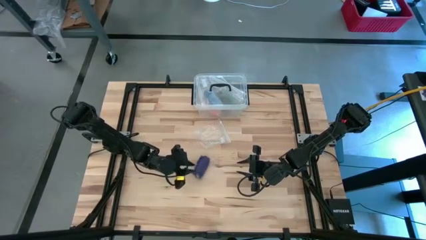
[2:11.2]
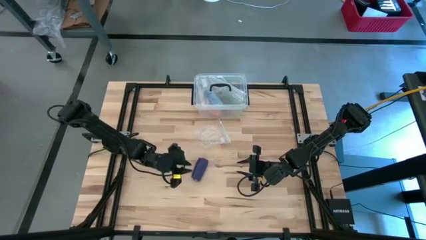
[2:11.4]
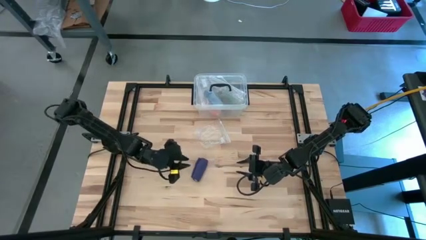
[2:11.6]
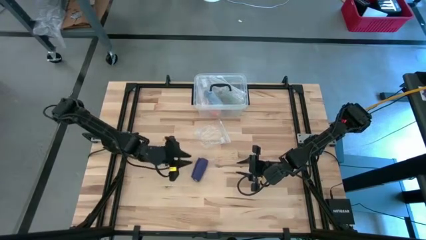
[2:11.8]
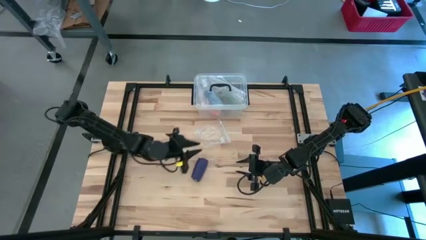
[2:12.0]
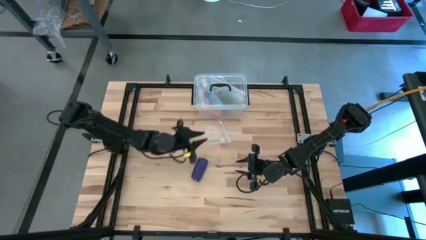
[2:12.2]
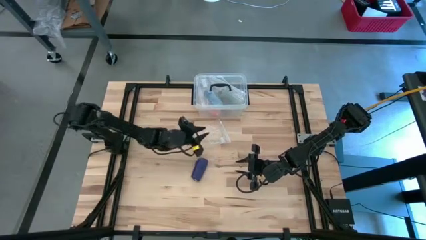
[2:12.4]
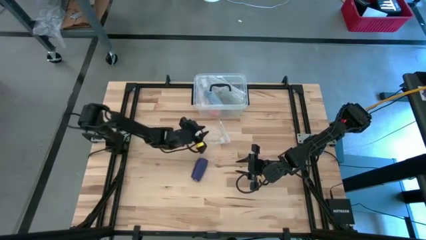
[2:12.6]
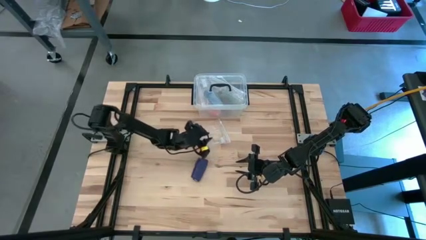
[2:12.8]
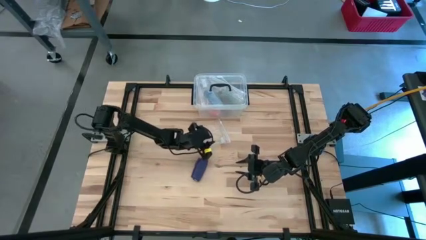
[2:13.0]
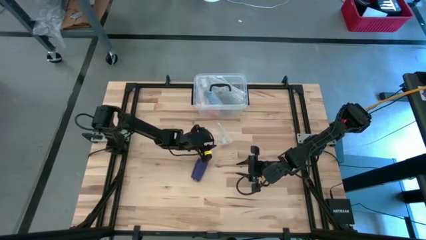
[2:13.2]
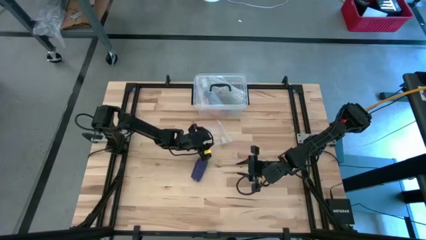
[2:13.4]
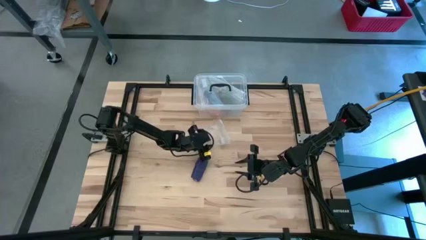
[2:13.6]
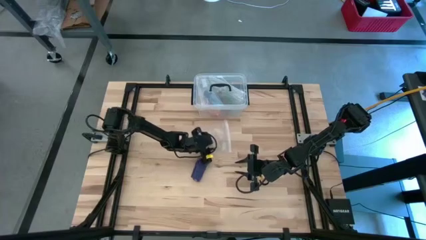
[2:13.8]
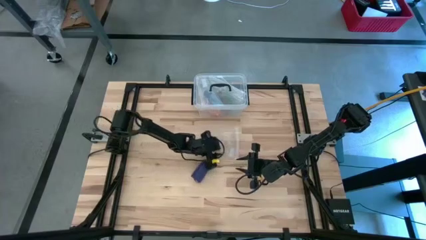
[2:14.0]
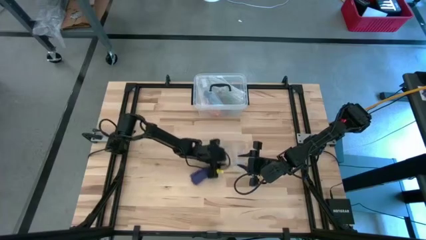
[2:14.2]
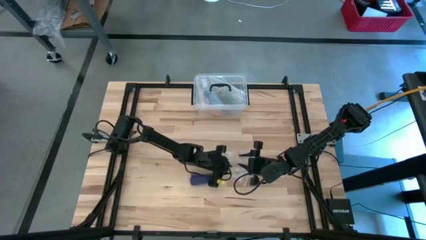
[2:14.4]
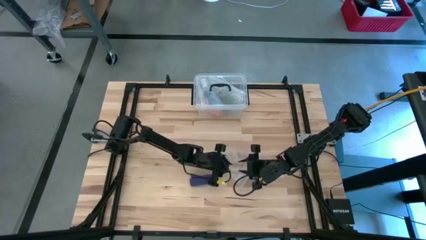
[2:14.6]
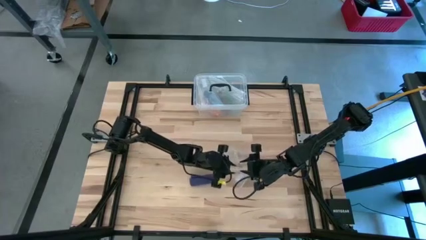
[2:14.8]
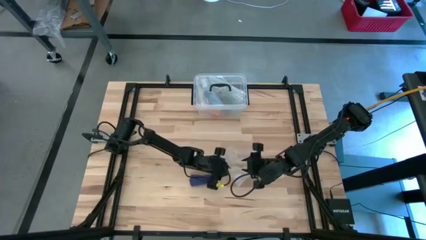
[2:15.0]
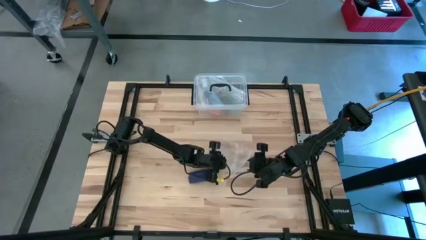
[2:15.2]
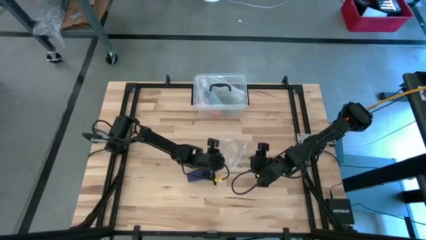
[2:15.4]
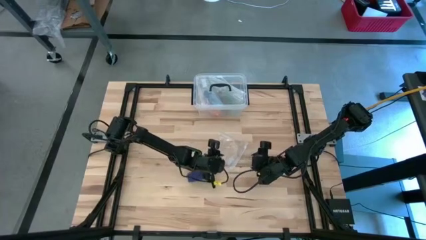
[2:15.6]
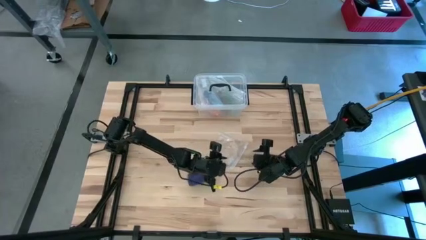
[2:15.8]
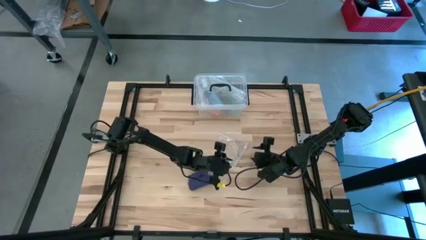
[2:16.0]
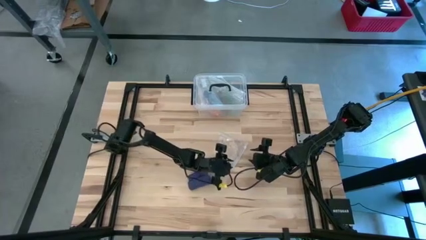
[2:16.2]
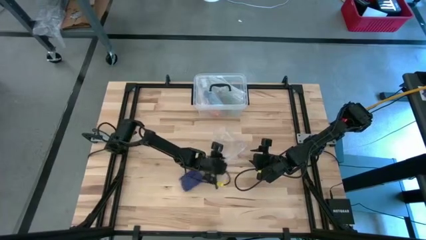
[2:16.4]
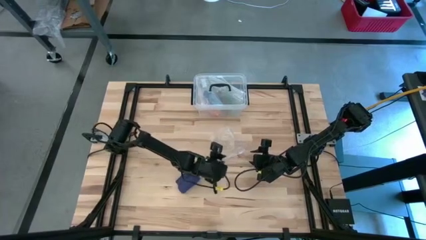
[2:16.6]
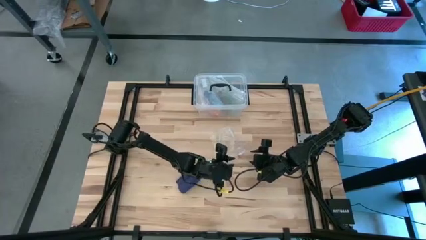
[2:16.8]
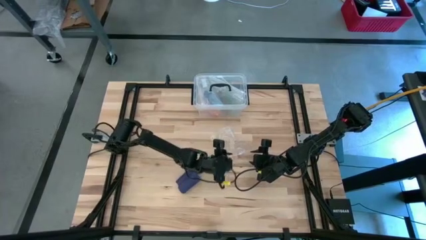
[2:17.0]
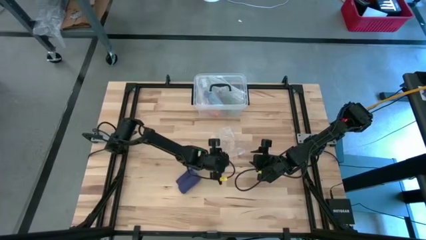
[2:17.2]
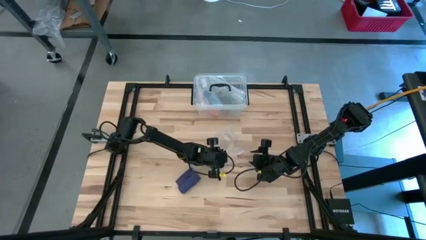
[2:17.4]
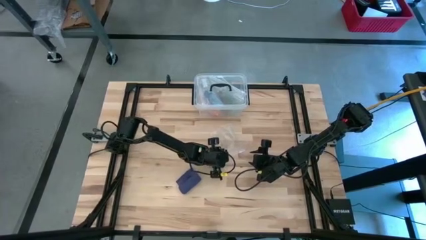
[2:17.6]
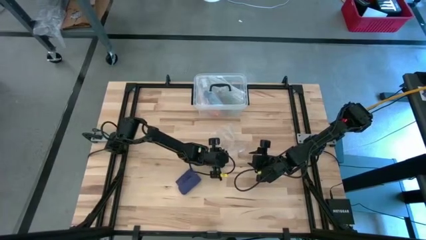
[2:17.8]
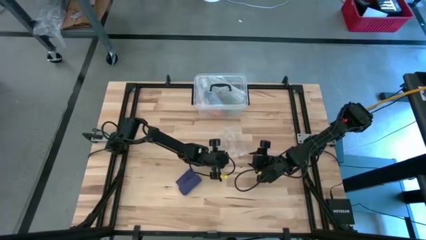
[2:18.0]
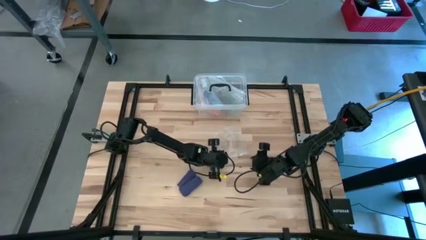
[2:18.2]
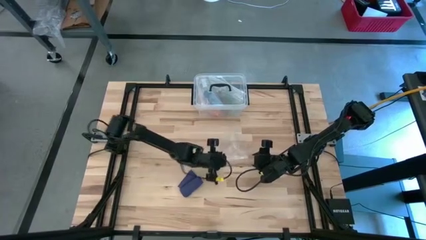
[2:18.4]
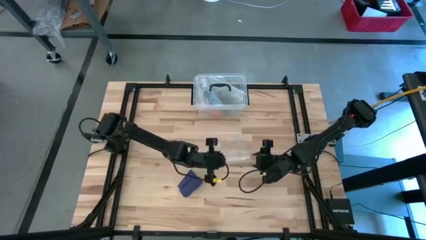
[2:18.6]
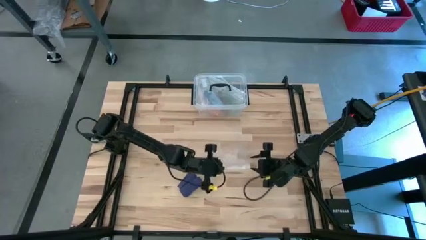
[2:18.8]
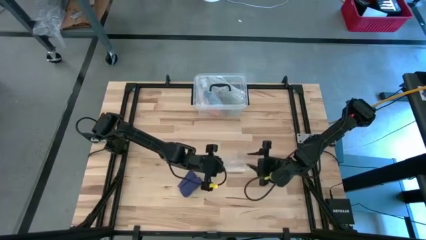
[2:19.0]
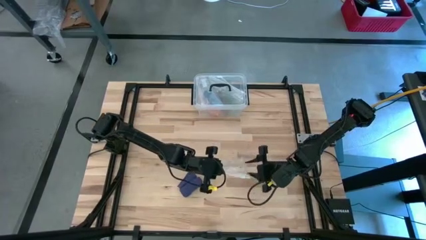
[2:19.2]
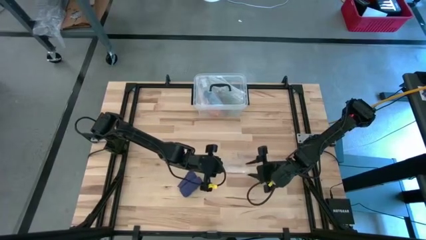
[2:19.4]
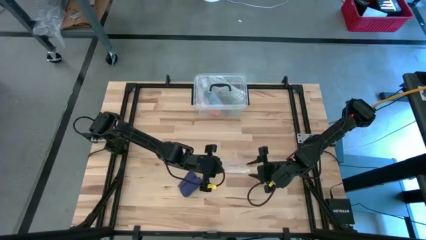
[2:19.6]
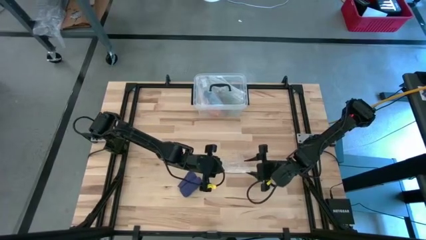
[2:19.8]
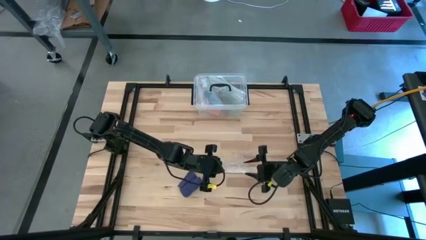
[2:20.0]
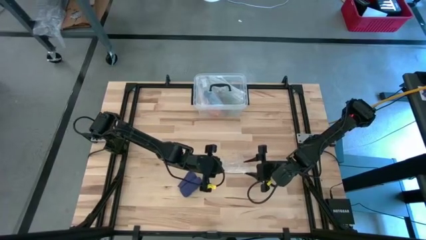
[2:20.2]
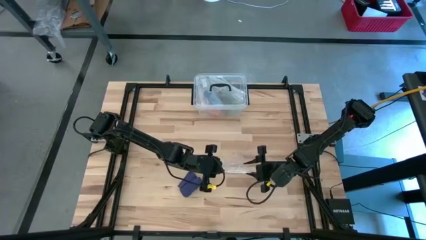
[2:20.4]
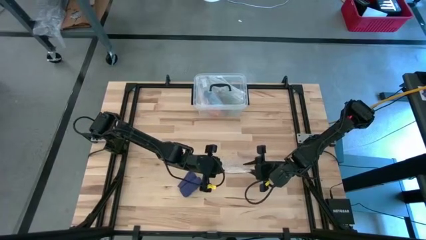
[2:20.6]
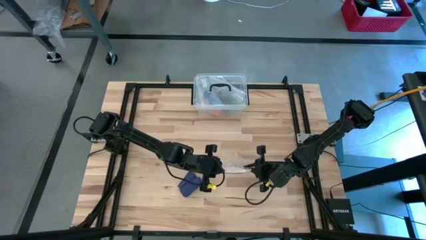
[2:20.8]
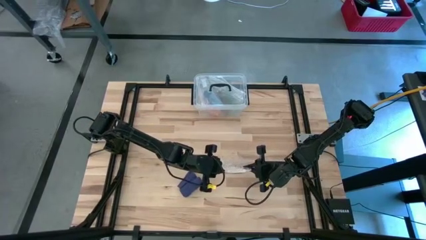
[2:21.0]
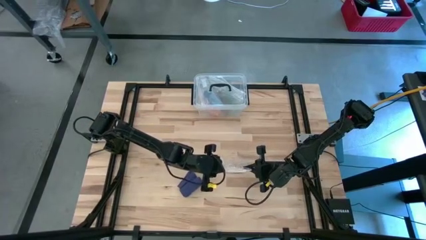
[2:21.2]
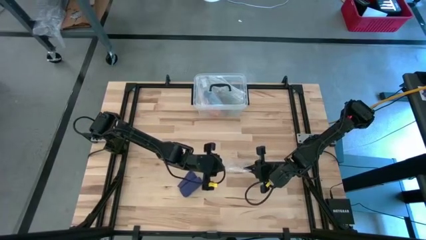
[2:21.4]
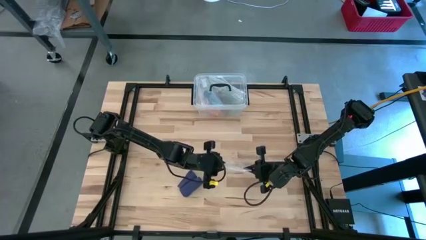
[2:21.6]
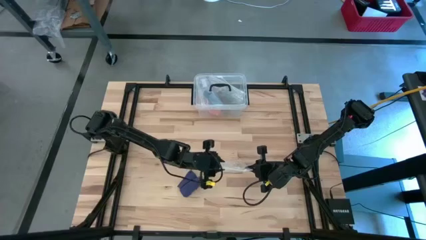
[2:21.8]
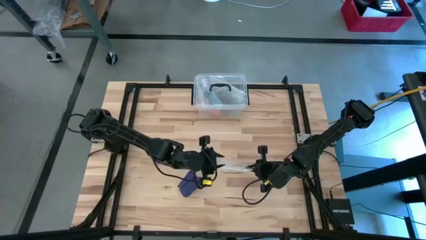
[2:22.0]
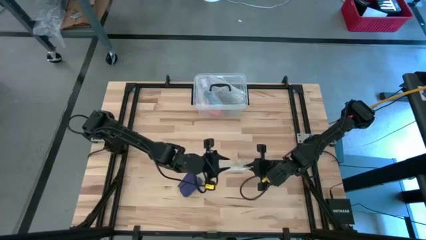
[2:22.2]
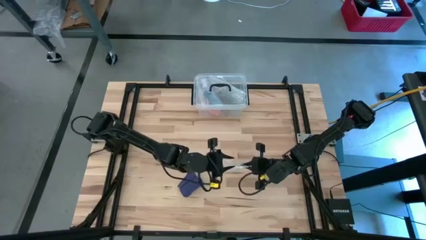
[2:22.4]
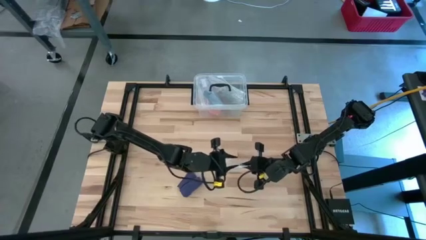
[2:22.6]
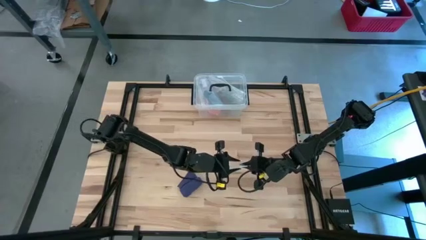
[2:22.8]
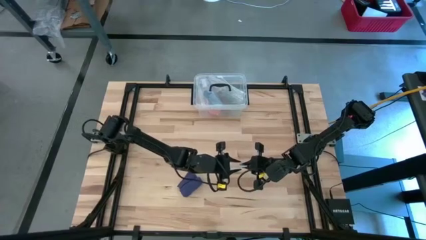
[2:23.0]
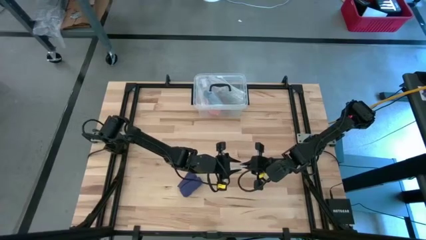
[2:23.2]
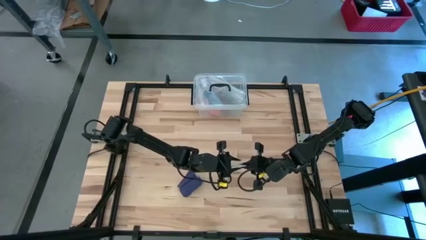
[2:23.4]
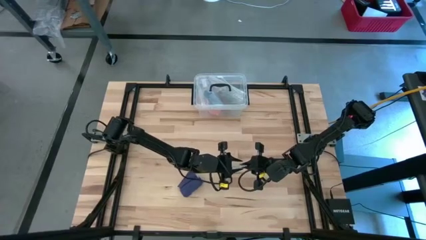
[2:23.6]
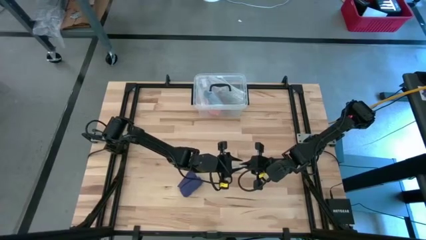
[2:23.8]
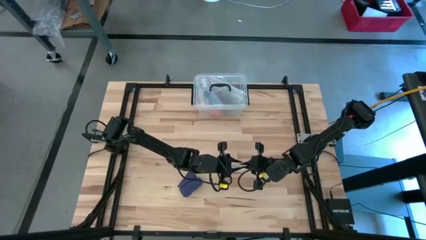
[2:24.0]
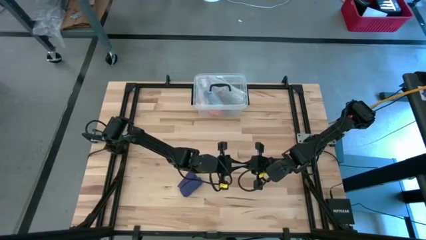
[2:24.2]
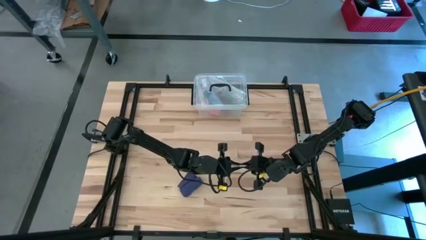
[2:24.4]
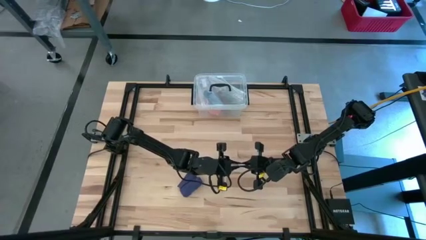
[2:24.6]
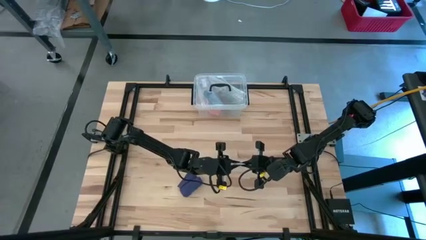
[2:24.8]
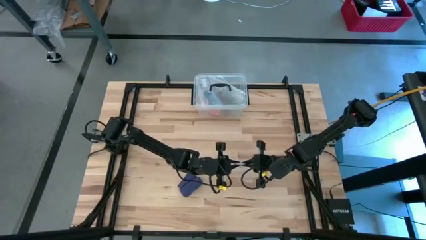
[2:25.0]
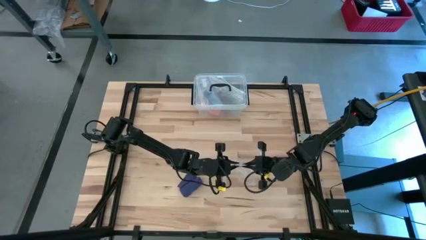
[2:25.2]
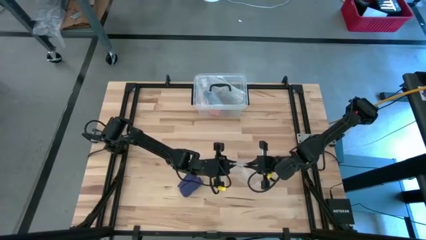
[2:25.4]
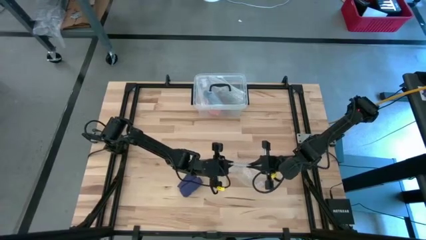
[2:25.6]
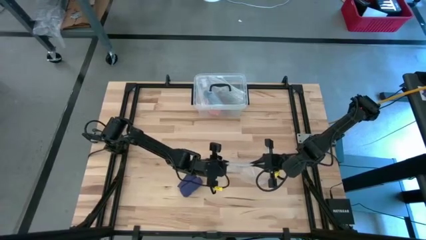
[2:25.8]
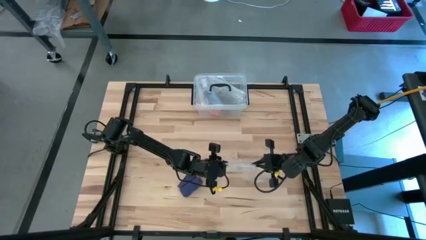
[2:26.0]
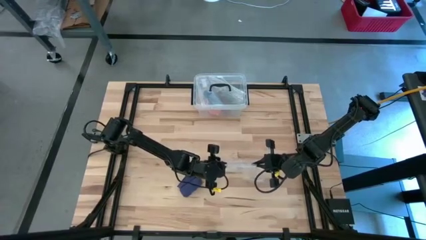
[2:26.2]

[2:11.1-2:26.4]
Task: Roll bandage
Open the transparent zip bag

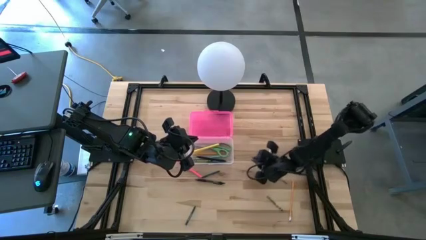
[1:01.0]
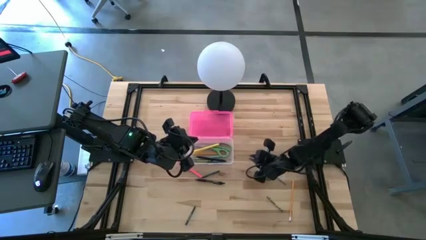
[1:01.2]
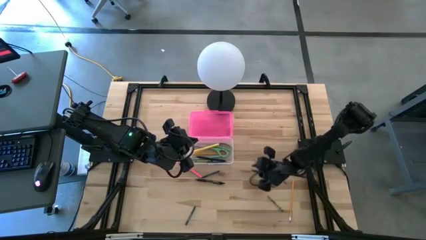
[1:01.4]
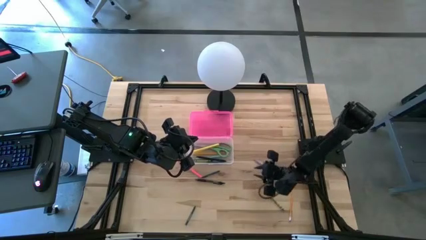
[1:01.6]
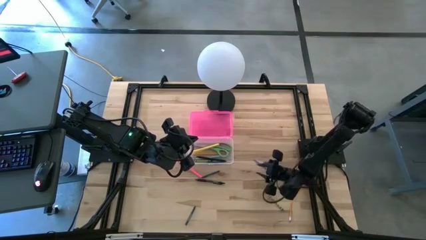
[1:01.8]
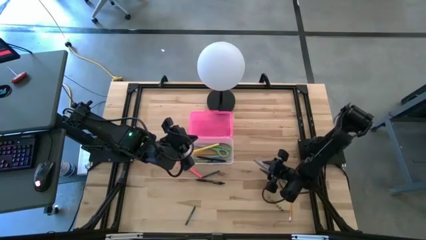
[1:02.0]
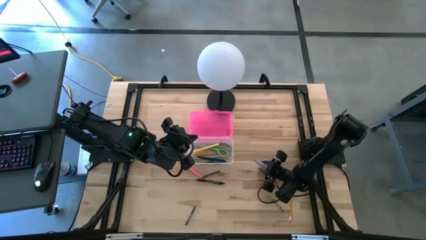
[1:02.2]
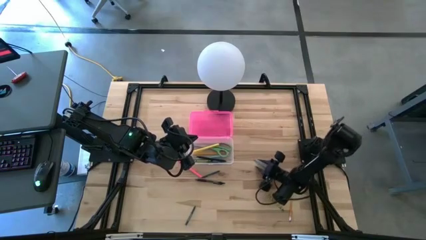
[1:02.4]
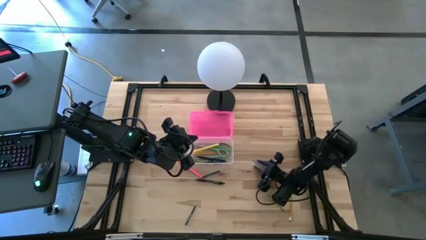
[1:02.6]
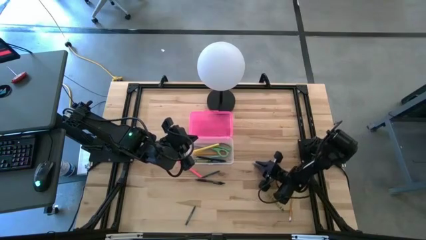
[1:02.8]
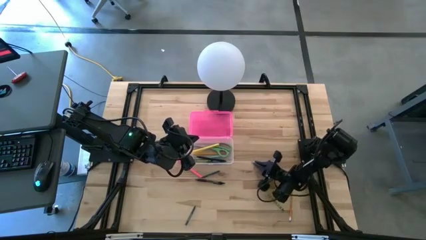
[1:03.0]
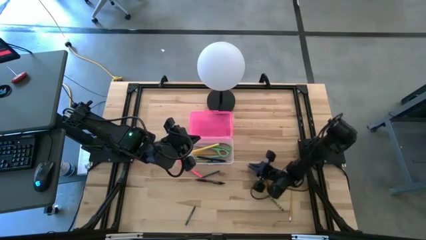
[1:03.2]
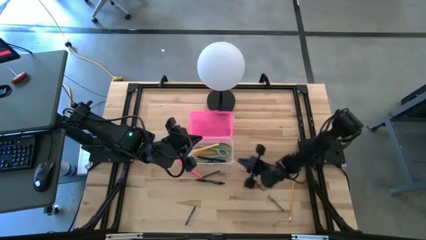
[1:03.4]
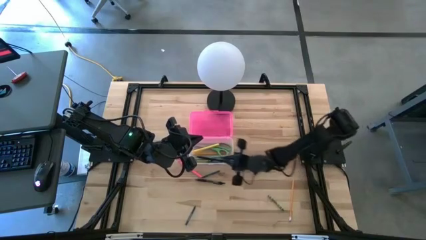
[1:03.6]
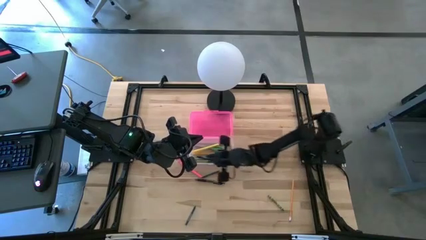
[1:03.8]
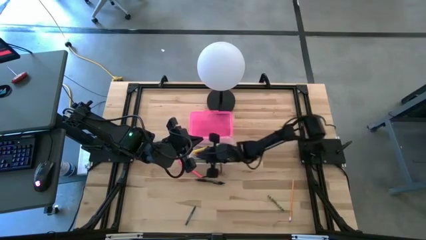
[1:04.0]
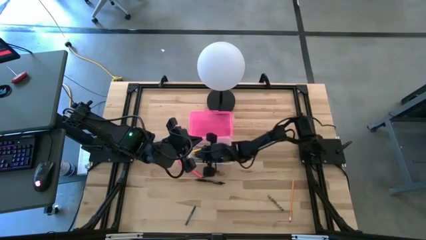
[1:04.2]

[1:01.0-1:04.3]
Task: Pick & place school supplies into a supply box
Put the light blue pencil into the pink supply box
